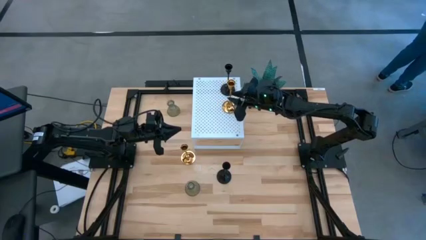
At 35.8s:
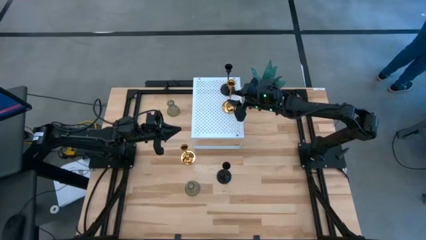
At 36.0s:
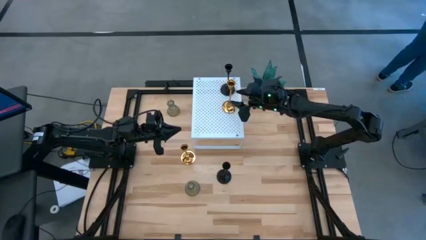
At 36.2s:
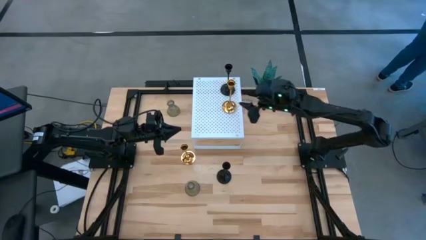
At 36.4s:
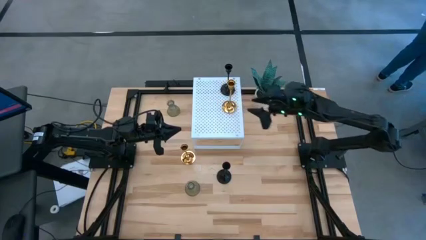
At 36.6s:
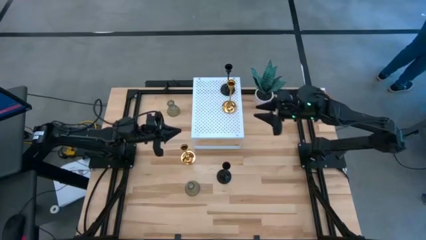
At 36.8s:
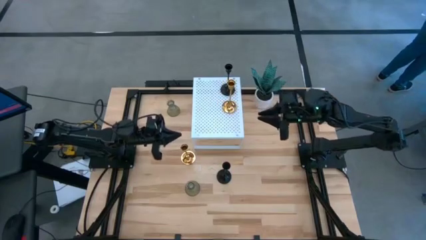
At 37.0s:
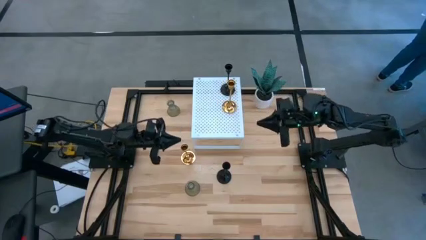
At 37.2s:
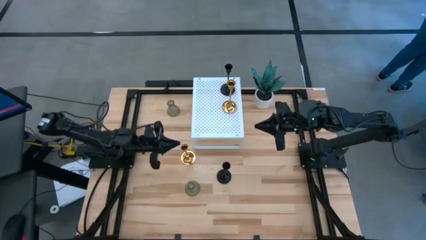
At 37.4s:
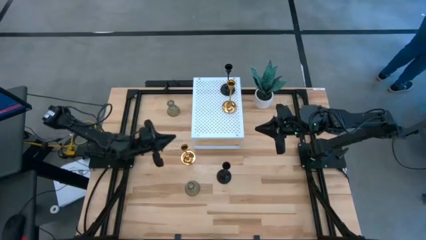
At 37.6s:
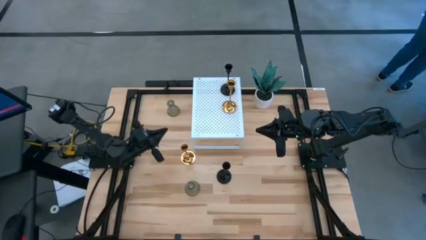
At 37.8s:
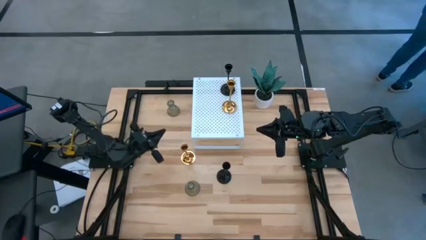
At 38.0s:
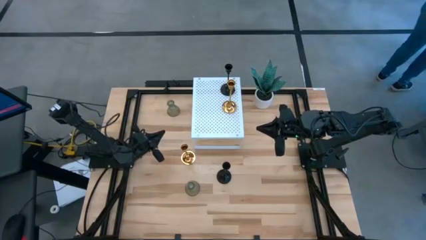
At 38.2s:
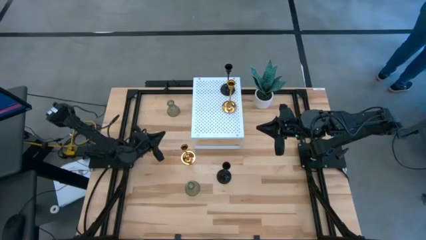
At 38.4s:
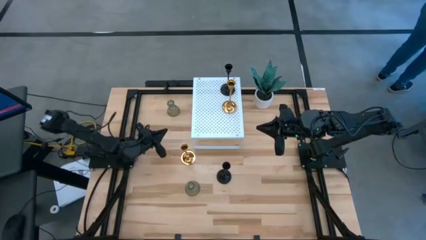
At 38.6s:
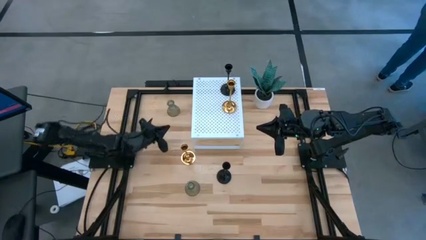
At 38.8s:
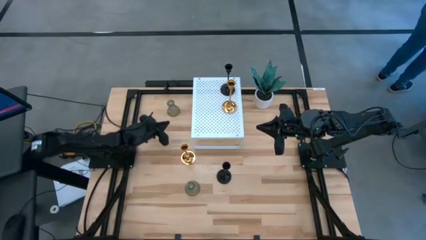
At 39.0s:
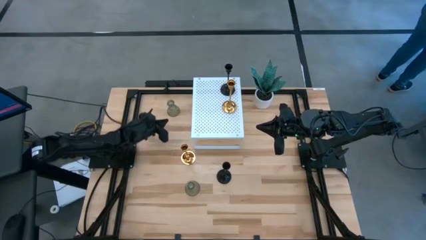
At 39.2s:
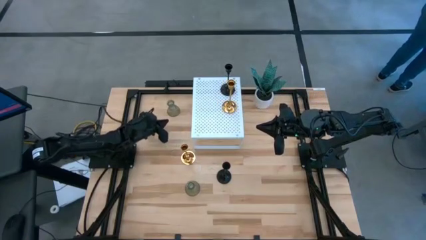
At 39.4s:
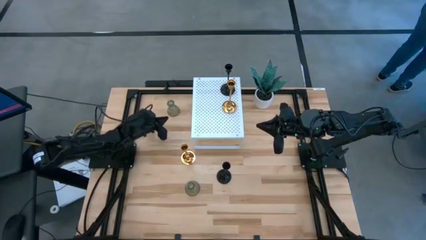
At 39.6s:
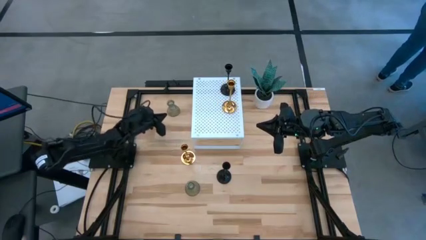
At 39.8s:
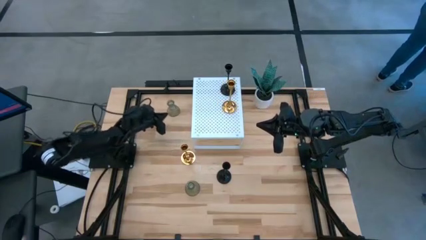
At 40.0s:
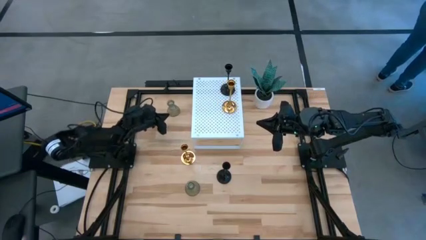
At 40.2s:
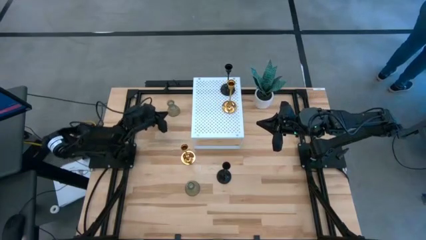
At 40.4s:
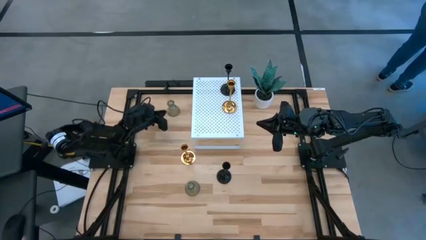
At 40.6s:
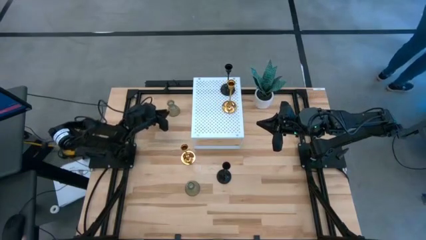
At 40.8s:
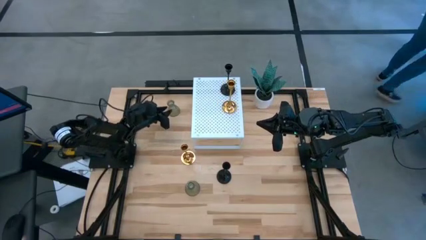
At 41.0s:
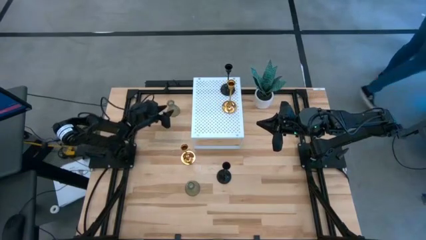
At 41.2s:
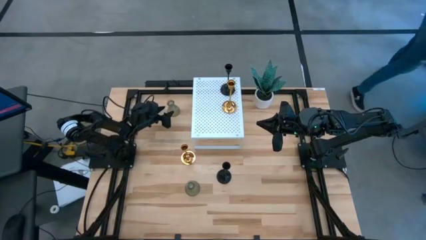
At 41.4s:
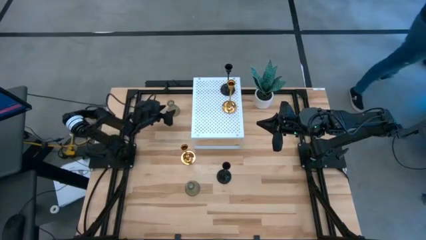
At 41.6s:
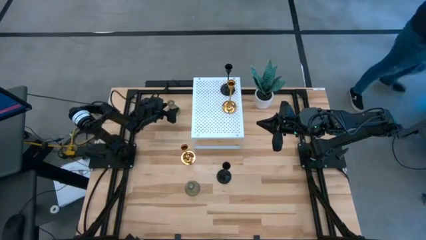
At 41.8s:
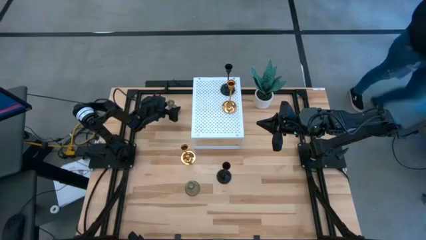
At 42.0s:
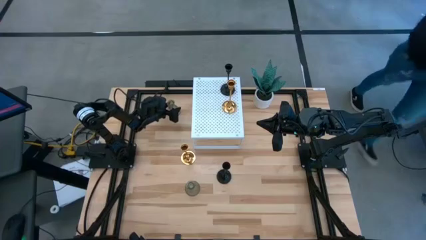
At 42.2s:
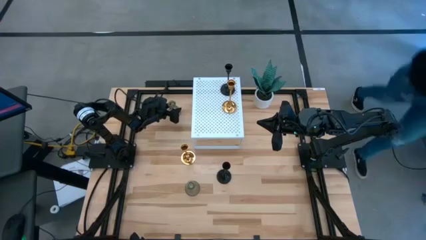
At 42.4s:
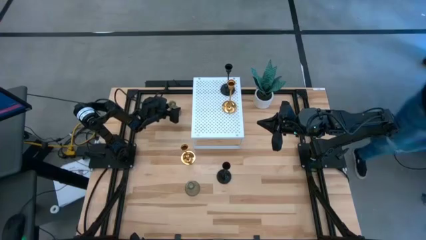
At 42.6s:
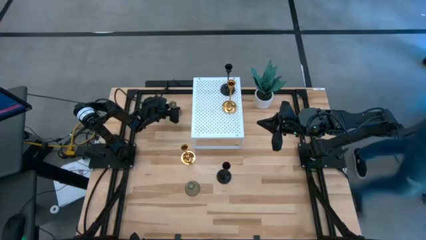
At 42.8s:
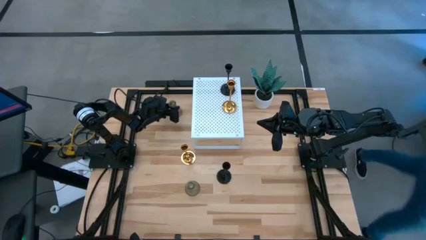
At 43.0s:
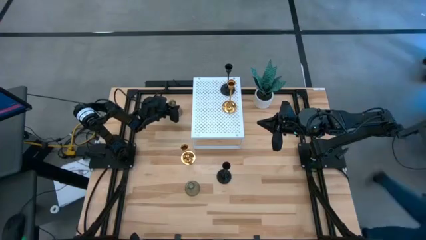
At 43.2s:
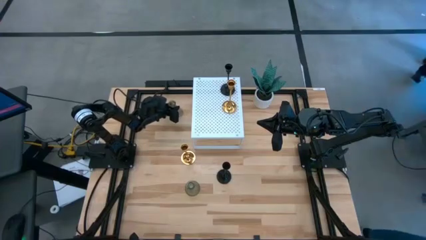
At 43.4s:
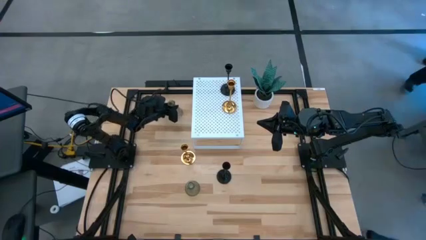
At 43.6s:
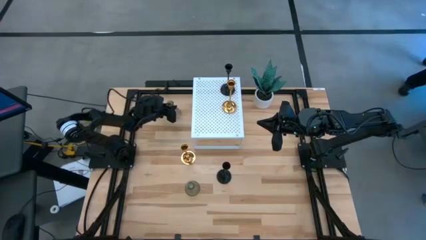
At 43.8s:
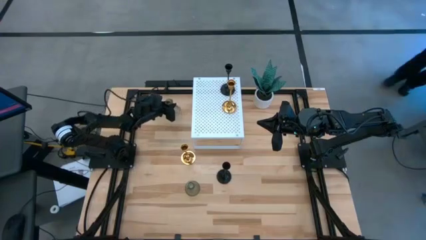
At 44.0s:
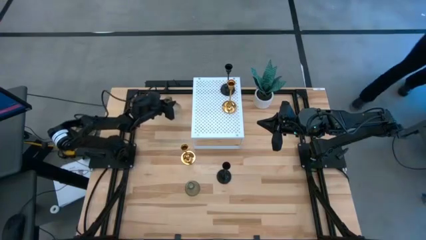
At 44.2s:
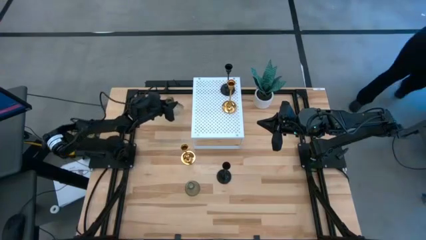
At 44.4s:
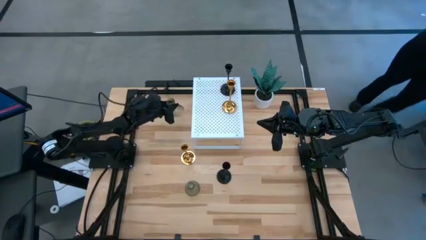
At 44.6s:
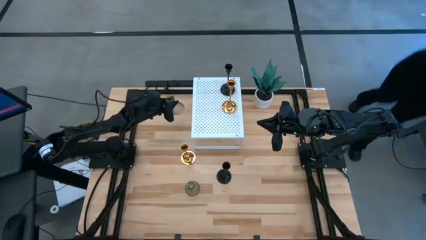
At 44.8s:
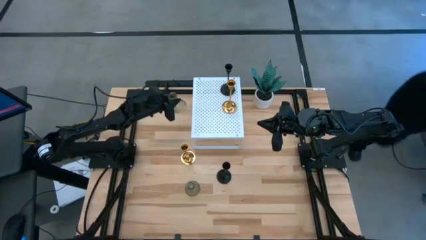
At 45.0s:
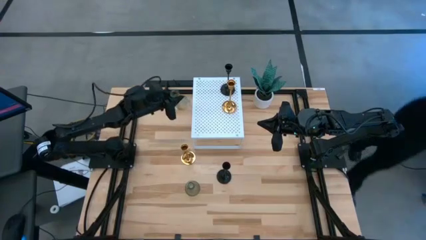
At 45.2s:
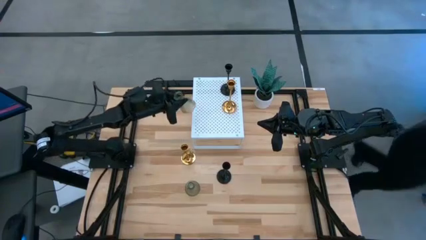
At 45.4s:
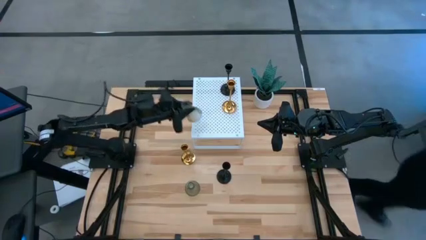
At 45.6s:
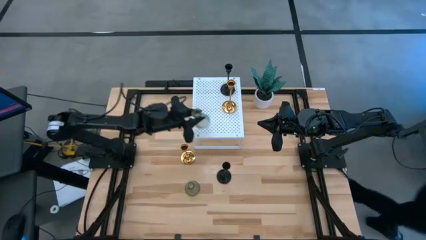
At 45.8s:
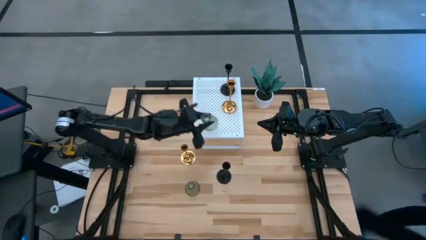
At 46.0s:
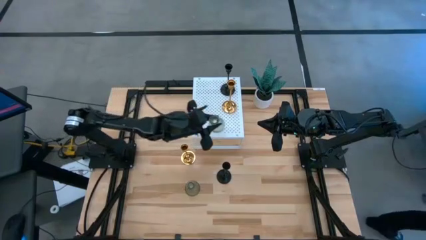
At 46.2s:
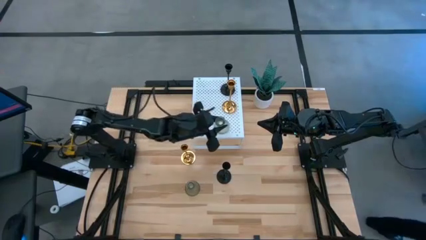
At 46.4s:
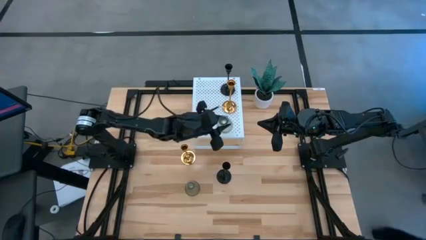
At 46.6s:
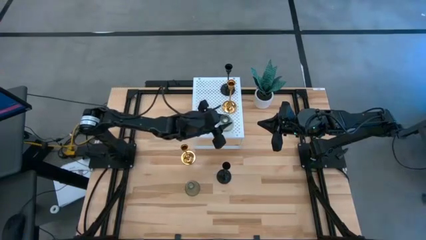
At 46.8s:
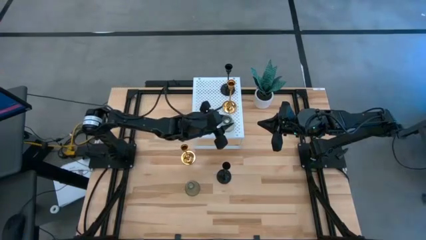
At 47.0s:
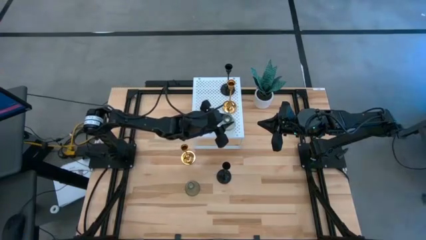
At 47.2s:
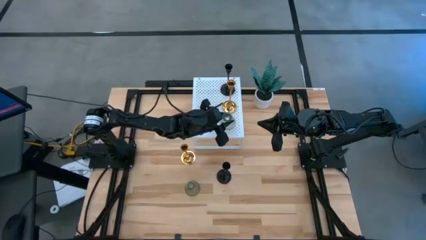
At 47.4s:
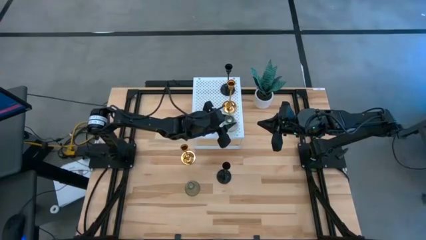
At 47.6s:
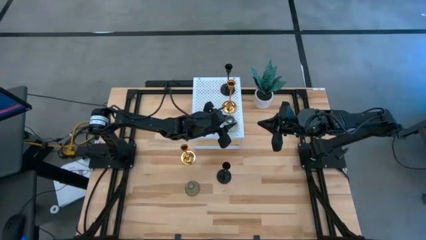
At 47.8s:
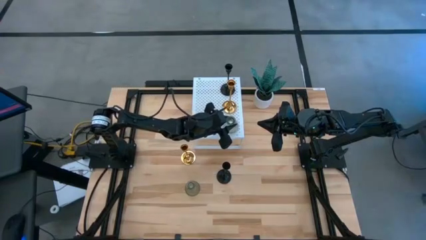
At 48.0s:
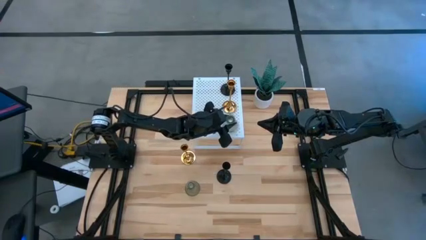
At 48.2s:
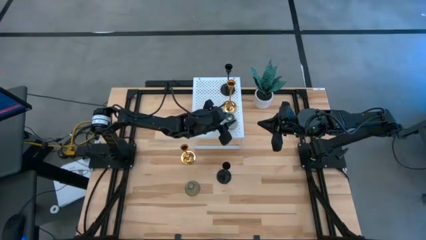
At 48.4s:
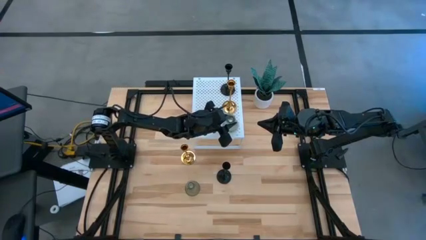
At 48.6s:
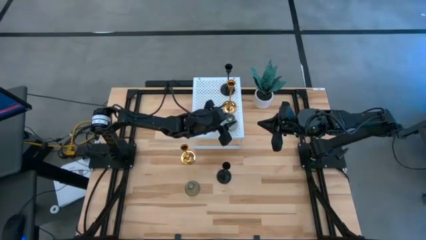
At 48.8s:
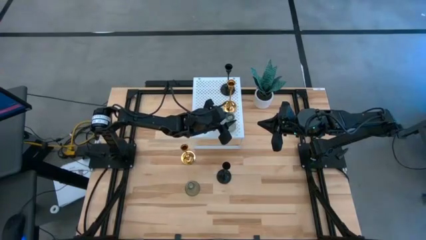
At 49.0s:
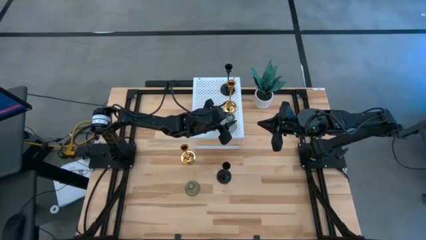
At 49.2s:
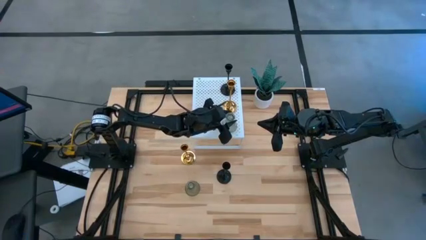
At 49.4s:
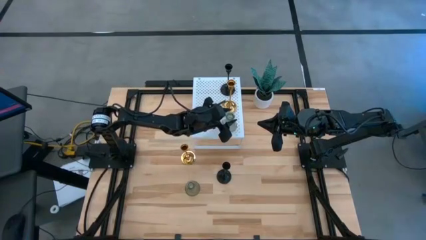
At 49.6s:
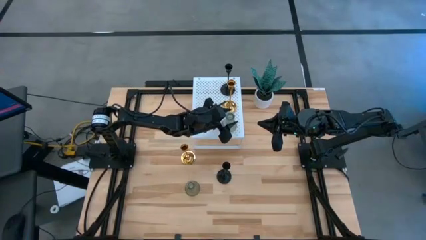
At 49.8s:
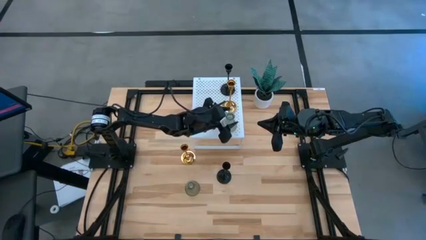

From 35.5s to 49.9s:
Task: Pick & Place candle stick holders
Put the top transparent glass candle holder on the shelf
